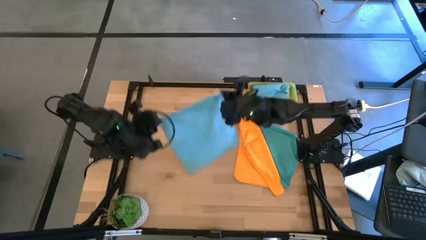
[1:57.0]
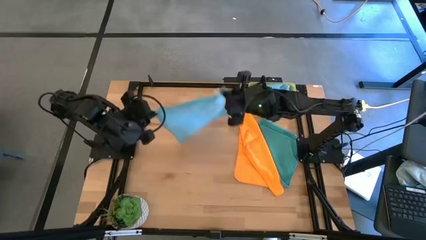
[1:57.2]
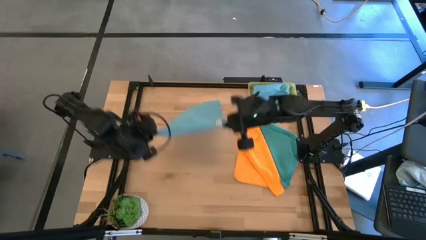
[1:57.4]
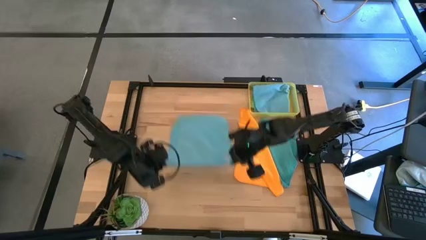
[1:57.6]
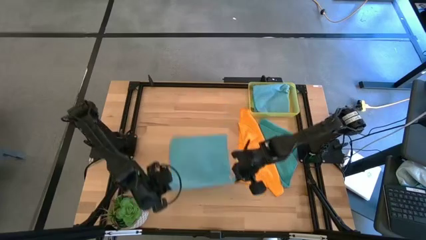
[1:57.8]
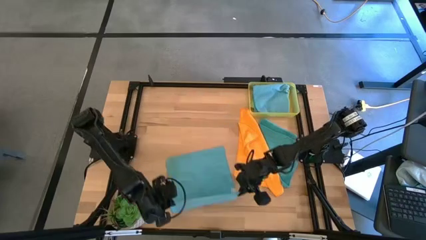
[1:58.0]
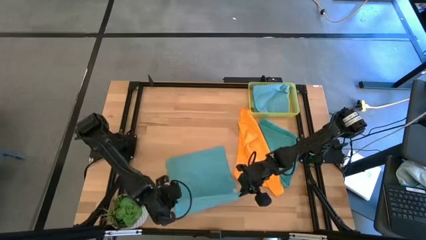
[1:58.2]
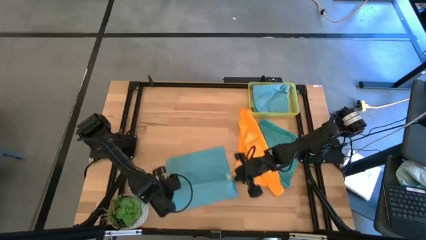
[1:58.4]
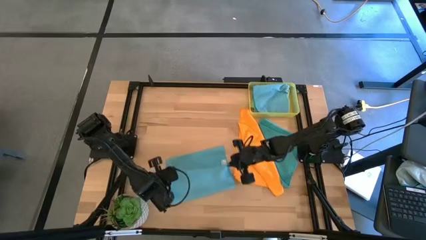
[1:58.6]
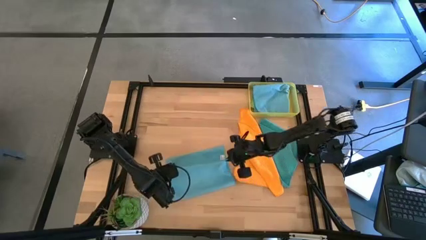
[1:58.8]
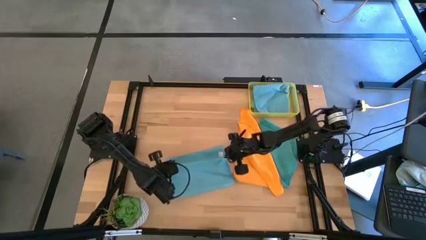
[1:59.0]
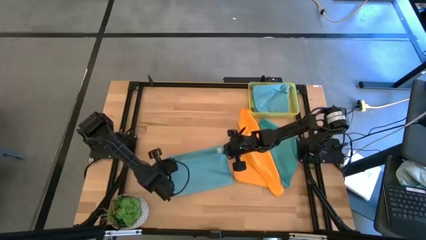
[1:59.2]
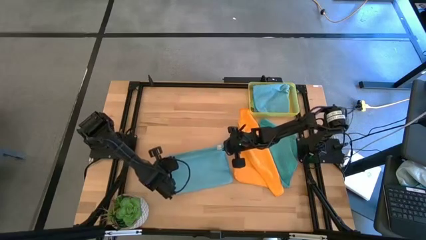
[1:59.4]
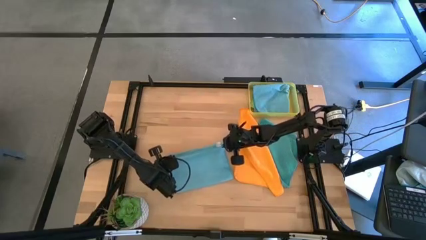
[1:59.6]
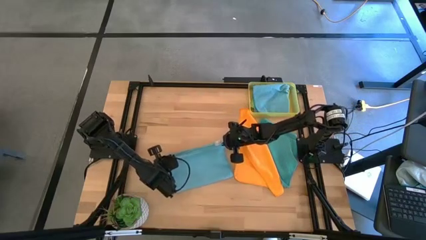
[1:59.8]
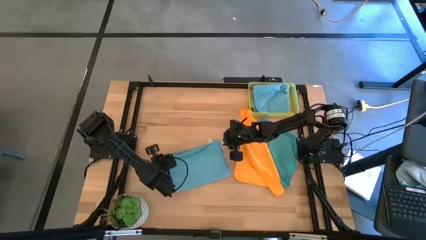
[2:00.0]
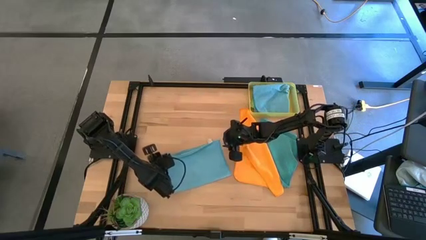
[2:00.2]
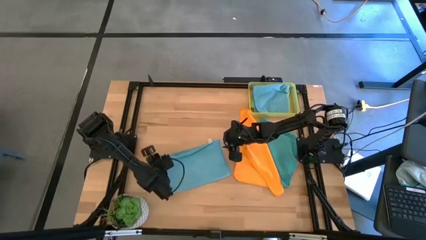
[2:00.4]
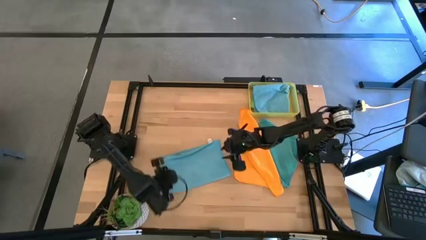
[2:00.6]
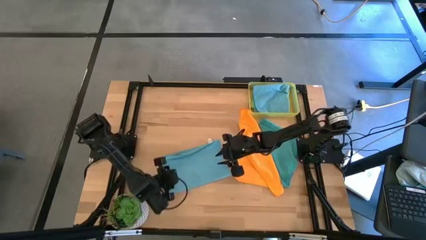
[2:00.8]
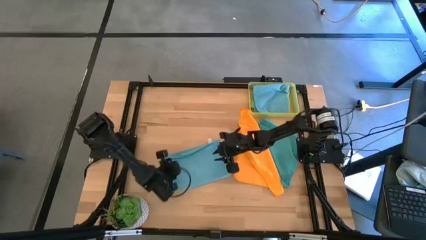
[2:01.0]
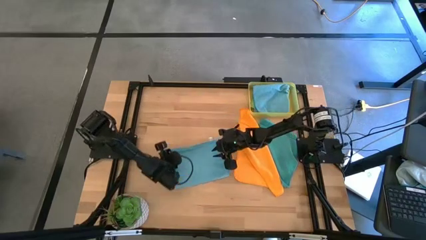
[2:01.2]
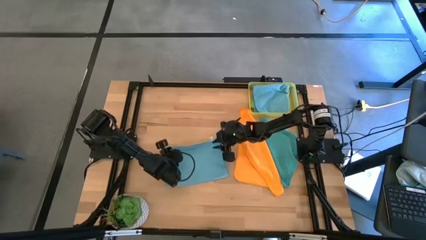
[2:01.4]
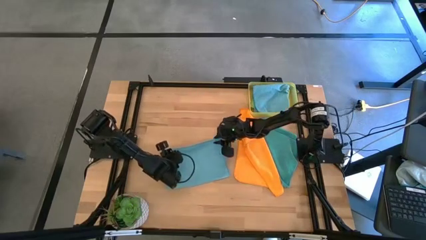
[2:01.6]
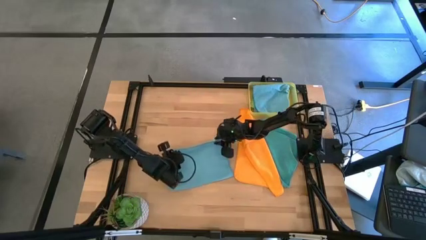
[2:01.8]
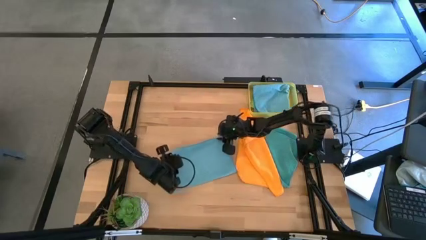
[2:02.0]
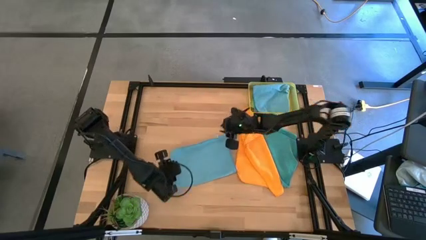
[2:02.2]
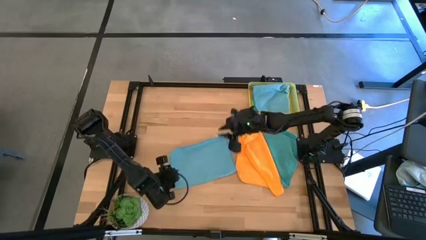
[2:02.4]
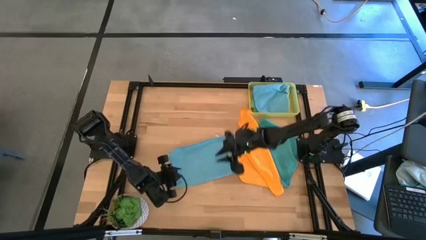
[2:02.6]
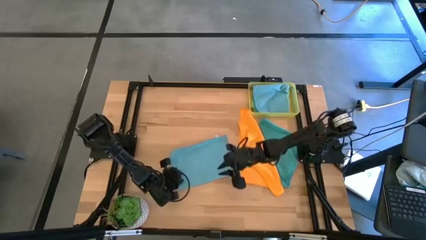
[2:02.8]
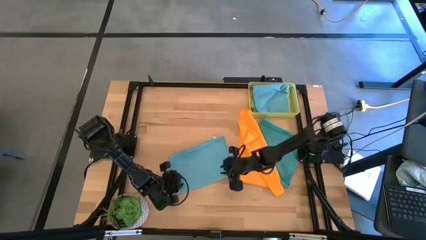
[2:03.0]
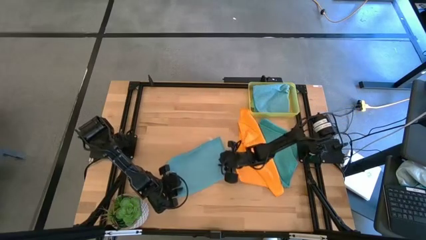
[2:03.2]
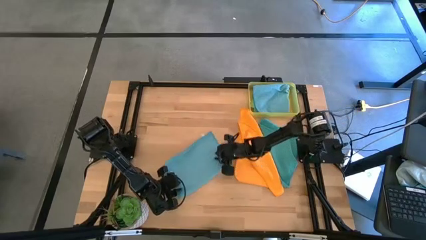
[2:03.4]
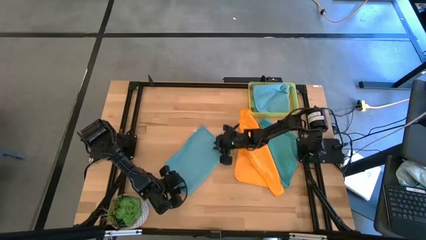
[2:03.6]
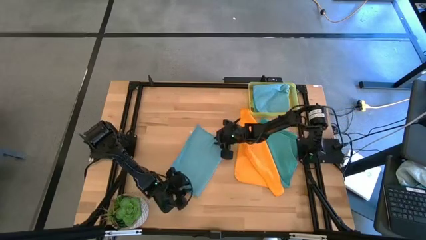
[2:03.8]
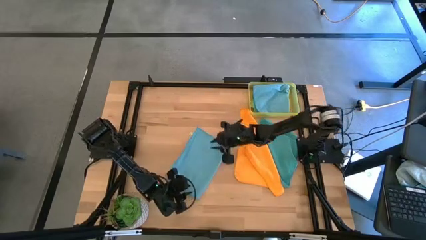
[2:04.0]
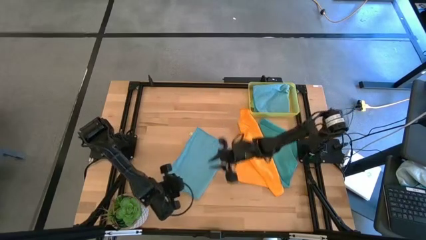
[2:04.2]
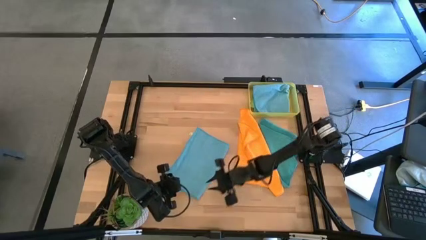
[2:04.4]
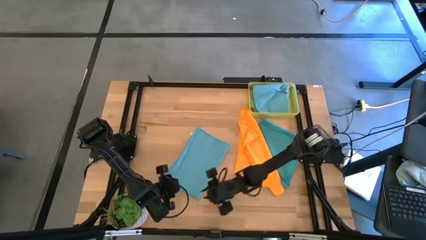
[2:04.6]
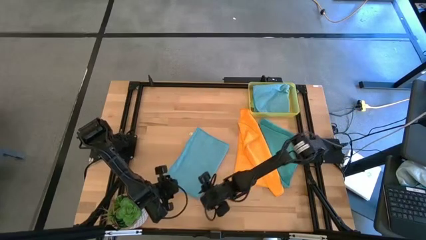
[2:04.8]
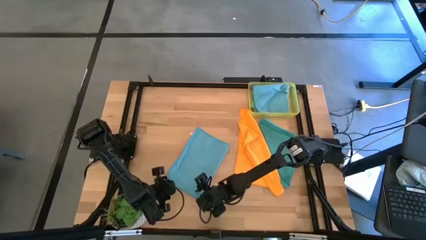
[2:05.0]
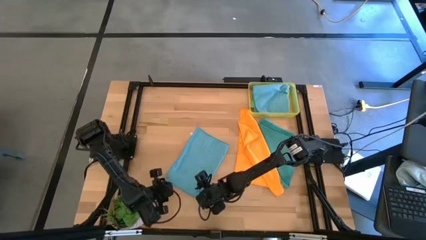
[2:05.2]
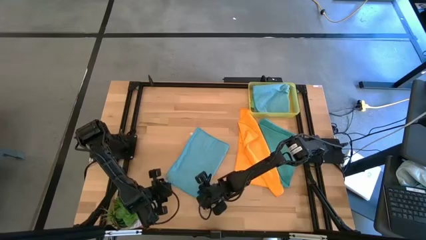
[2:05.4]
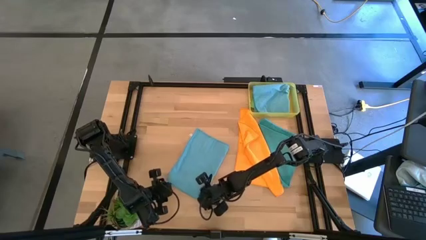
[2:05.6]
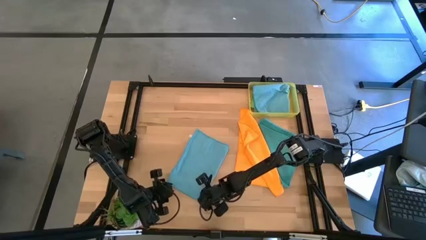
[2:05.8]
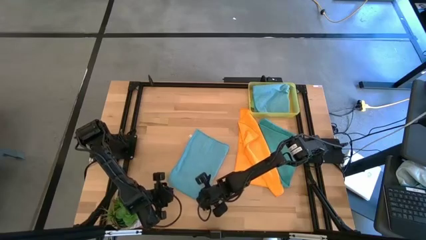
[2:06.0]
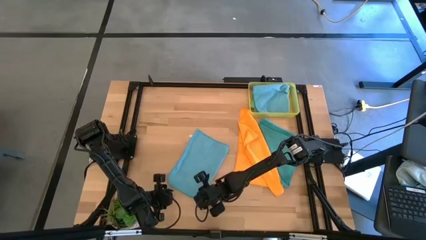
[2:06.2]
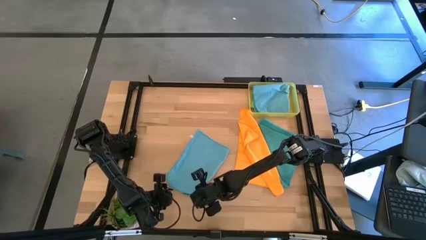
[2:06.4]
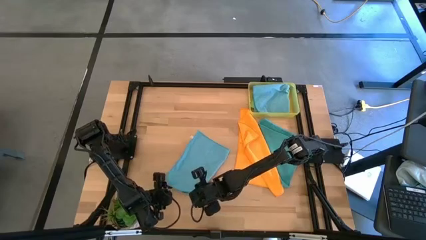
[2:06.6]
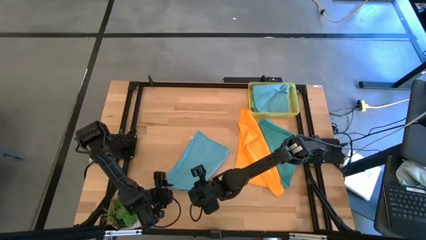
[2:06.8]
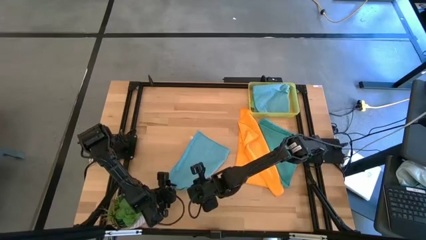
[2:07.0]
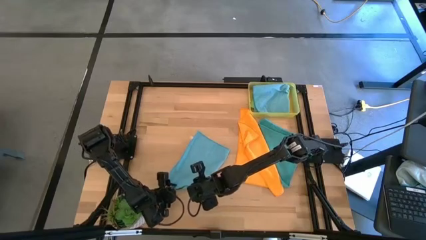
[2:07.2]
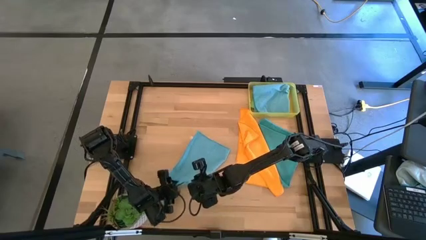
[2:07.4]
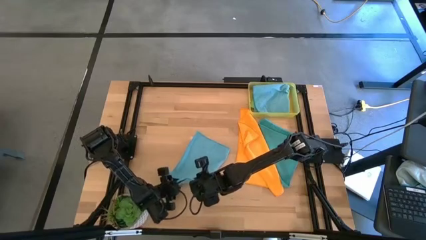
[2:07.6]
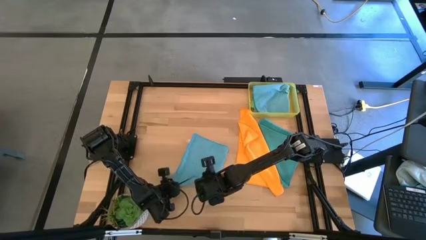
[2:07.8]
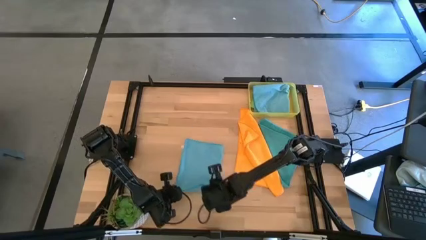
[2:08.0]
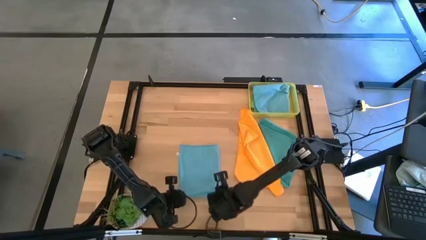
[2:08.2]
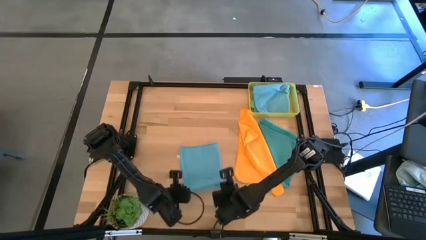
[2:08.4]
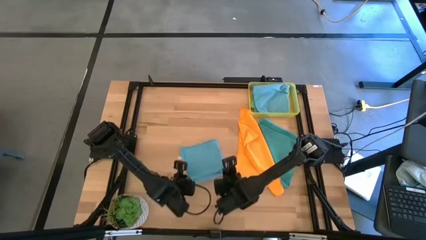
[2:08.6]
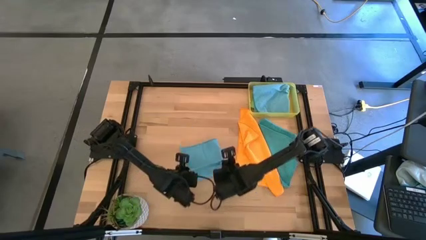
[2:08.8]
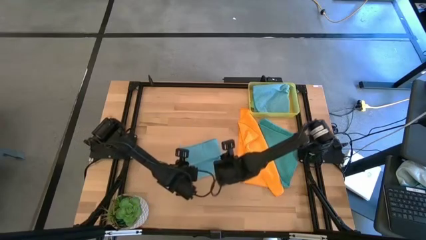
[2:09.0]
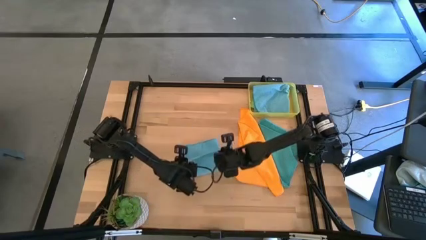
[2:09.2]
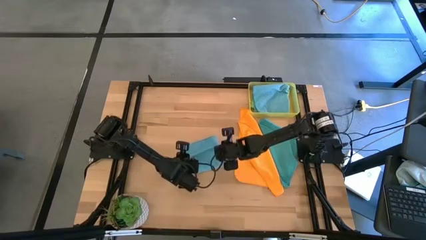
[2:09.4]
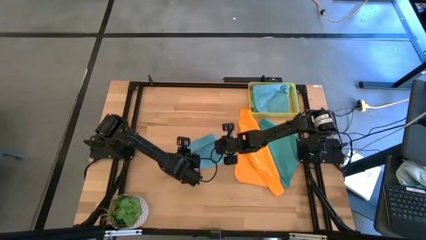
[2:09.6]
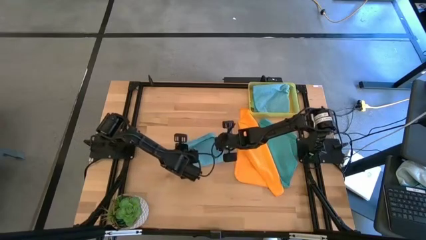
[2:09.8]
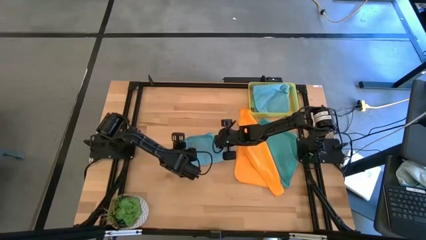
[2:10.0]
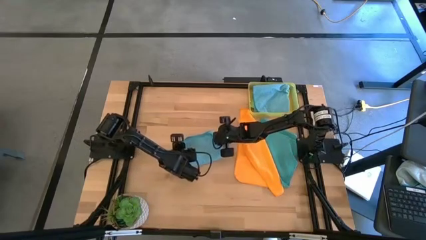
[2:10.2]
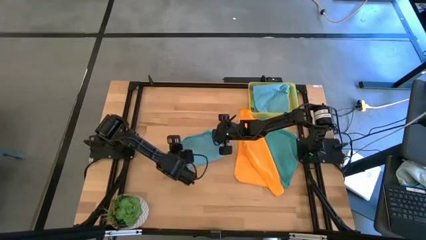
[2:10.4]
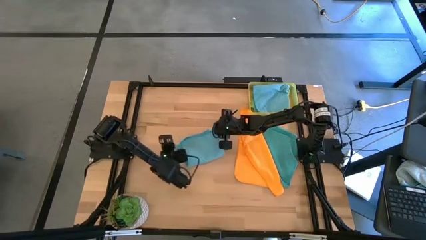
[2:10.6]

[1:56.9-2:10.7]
Task: Fold microfiber towels
Fold the left blue microfiber cloth
